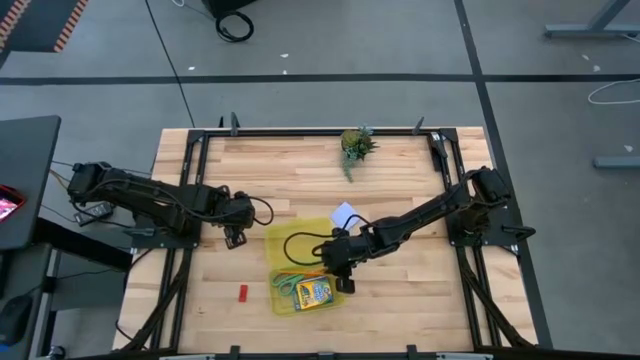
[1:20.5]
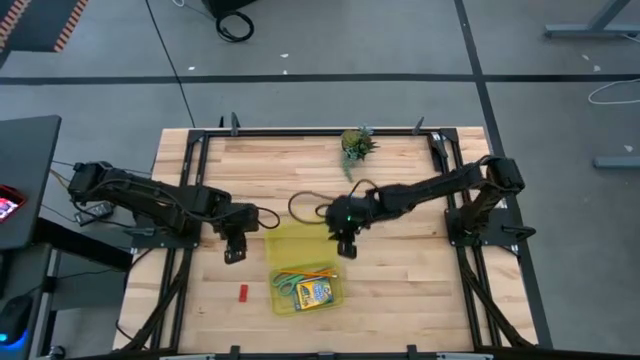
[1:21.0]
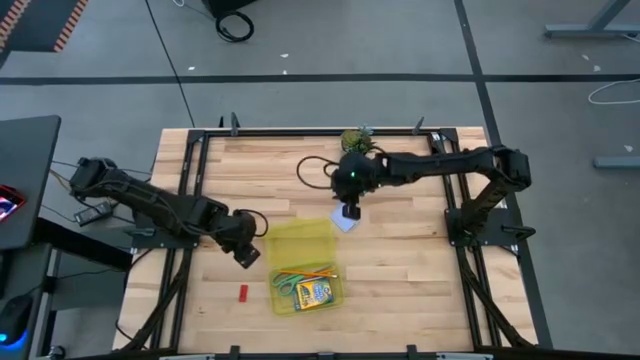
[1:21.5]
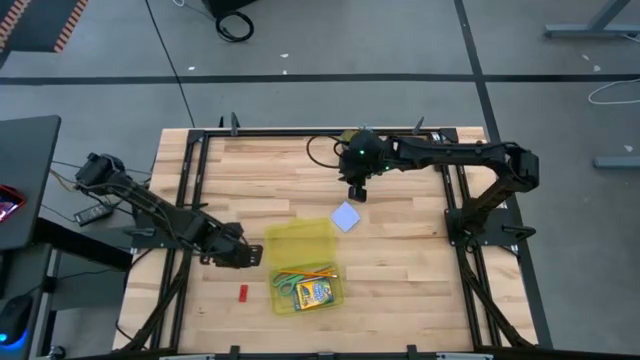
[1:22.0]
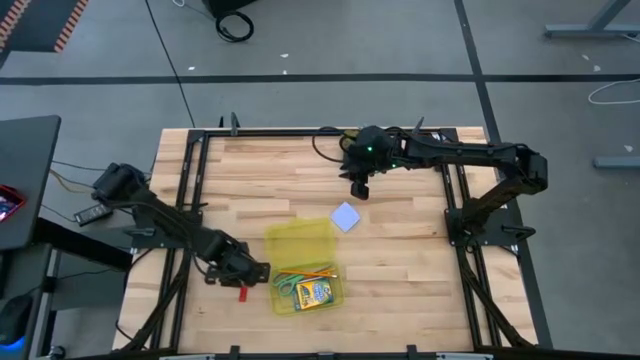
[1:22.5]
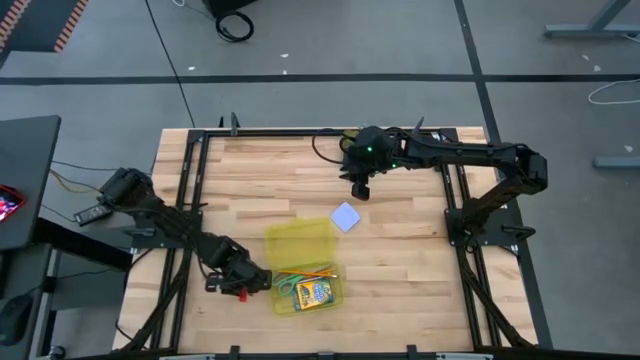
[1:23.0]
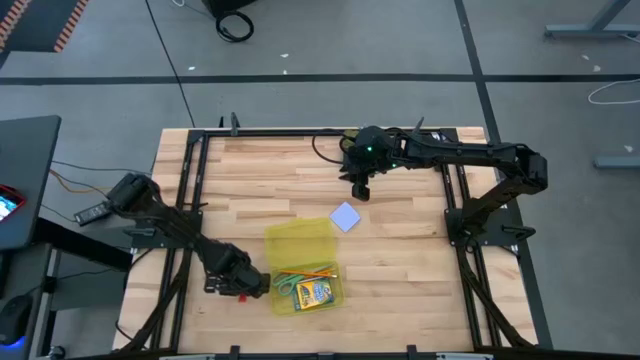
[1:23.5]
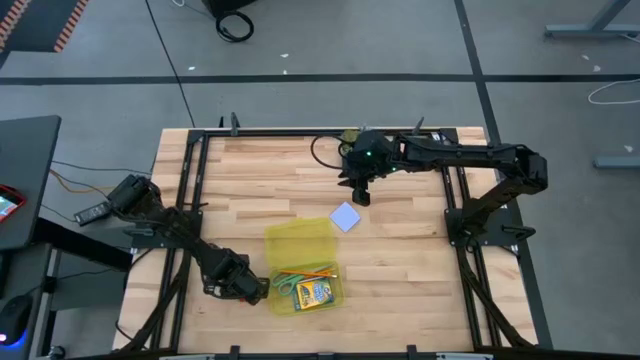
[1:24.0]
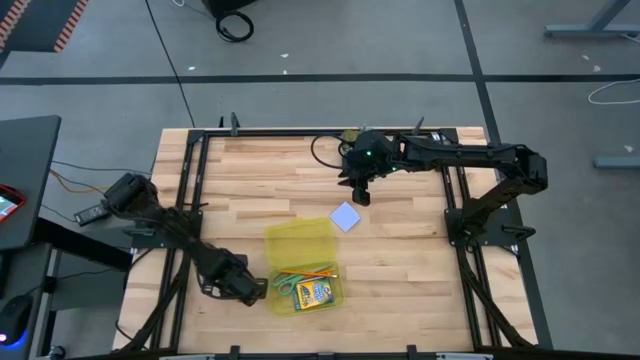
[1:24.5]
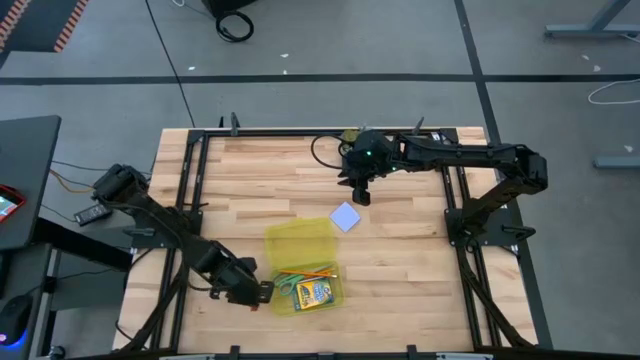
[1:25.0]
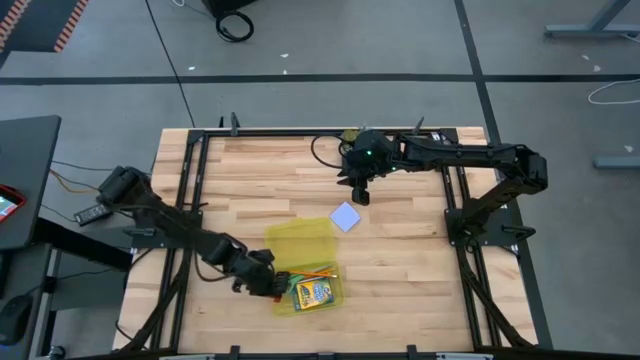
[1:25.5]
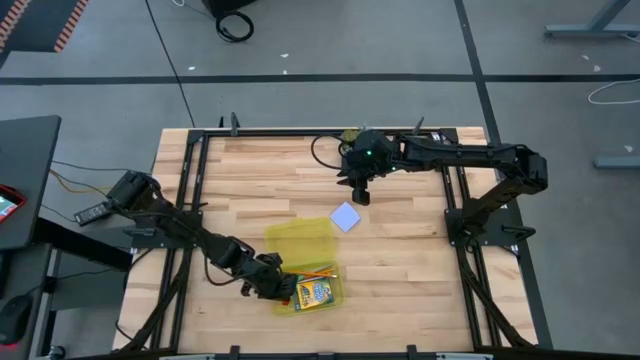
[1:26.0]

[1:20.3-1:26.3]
Task: Pack school essentials
Put the red eraser into the yellow supply box

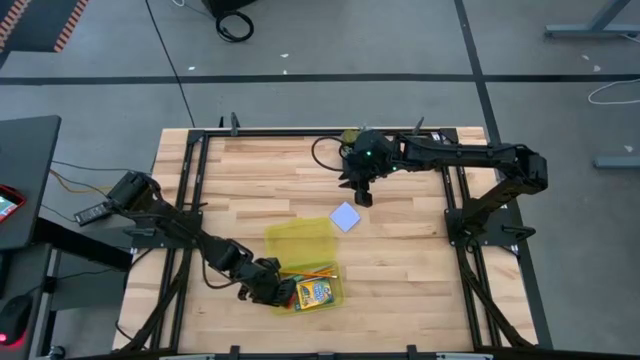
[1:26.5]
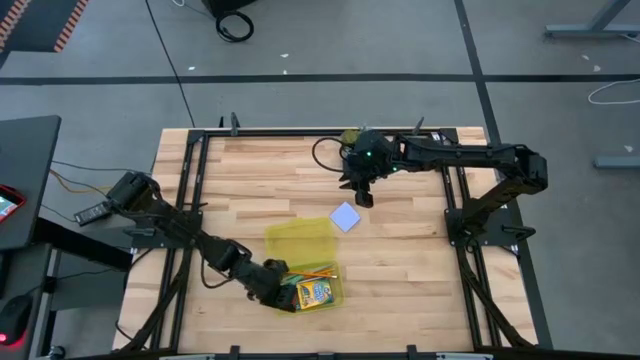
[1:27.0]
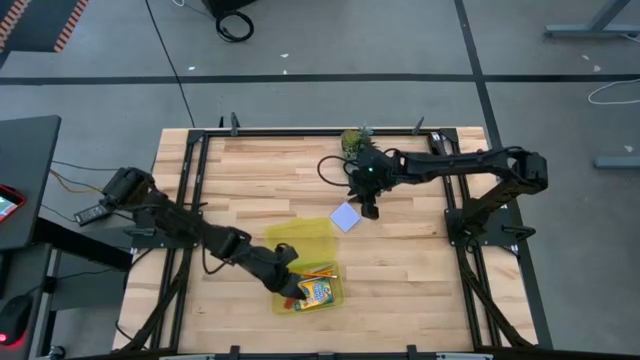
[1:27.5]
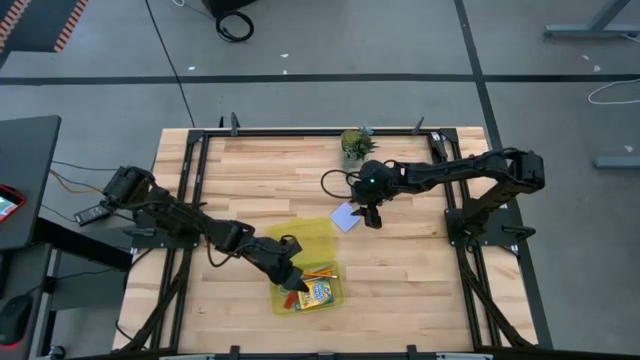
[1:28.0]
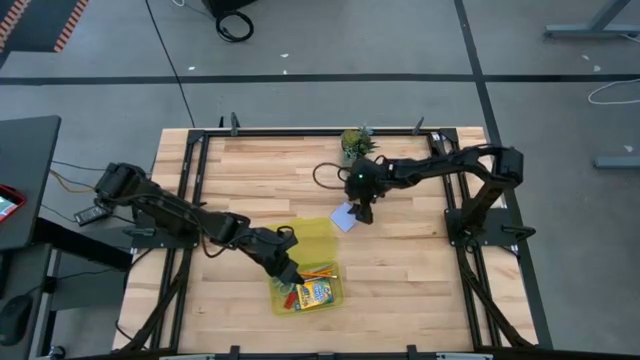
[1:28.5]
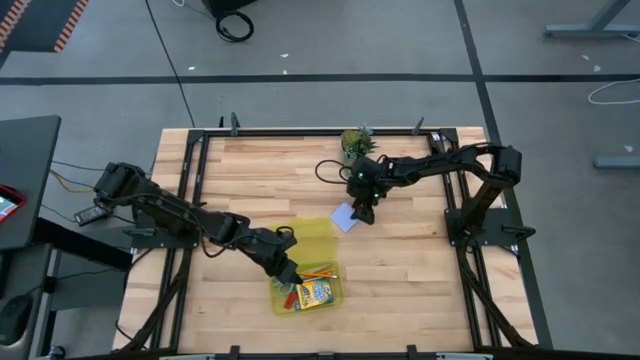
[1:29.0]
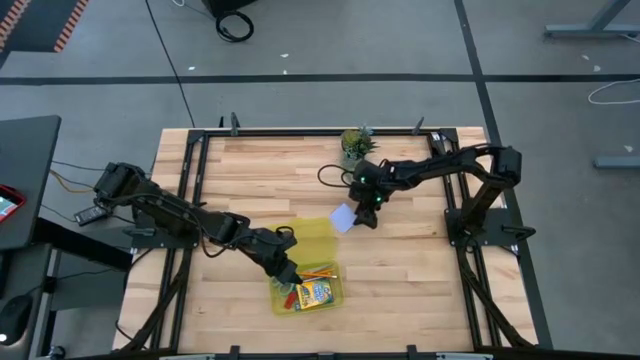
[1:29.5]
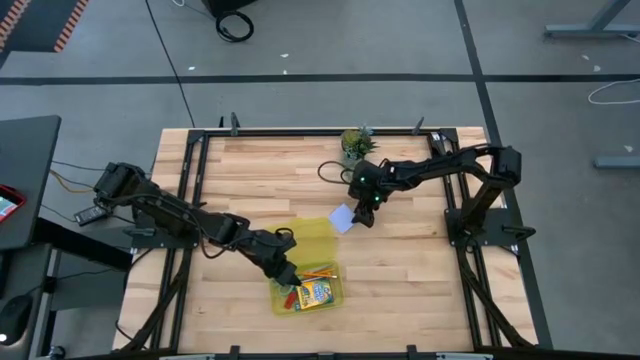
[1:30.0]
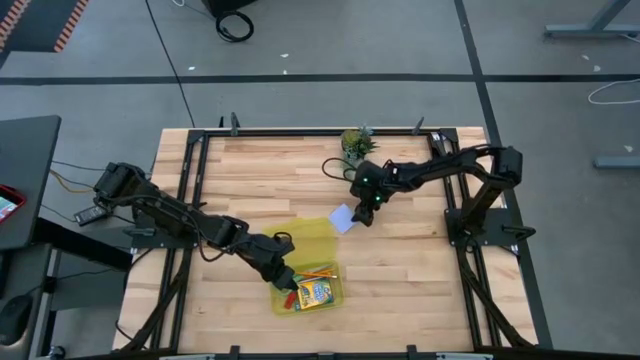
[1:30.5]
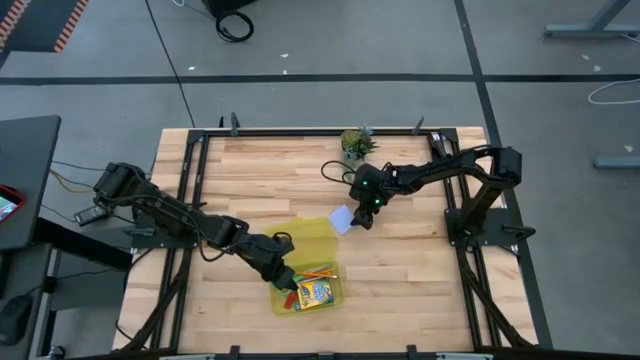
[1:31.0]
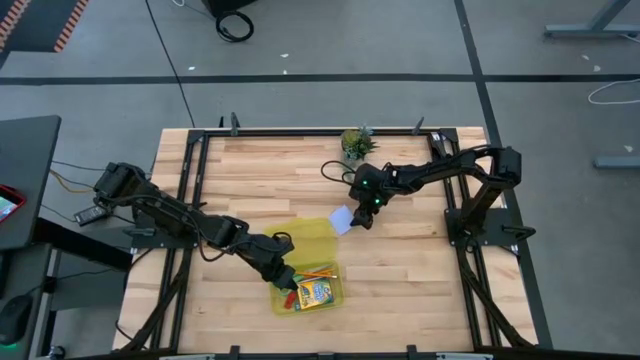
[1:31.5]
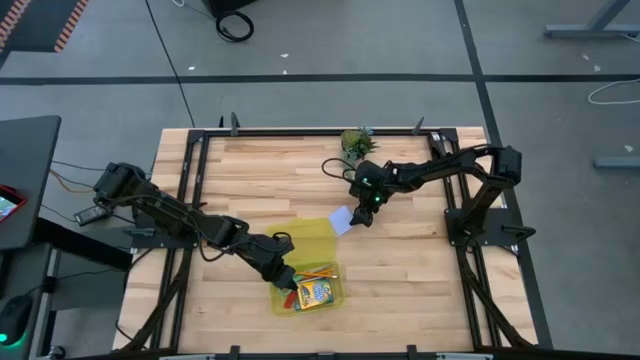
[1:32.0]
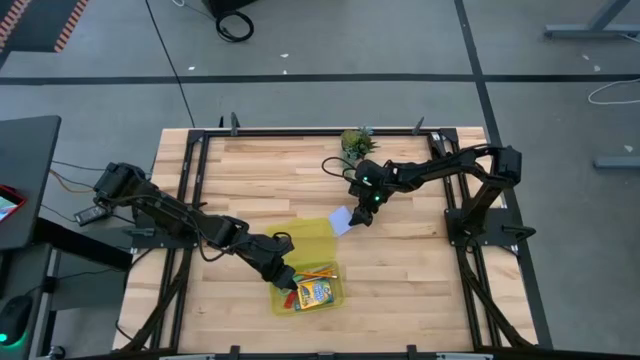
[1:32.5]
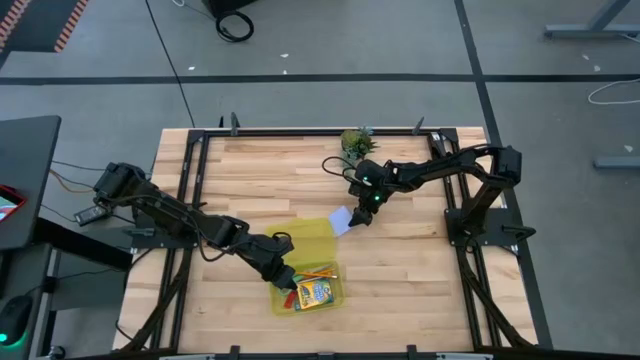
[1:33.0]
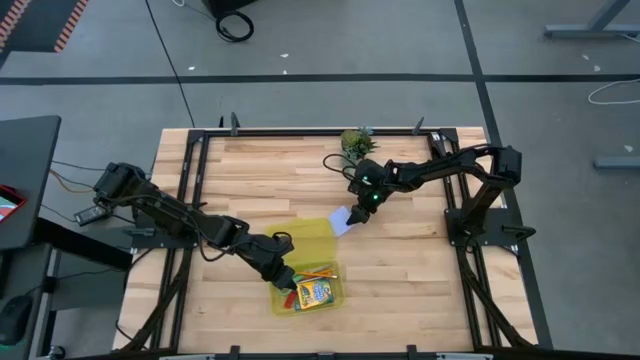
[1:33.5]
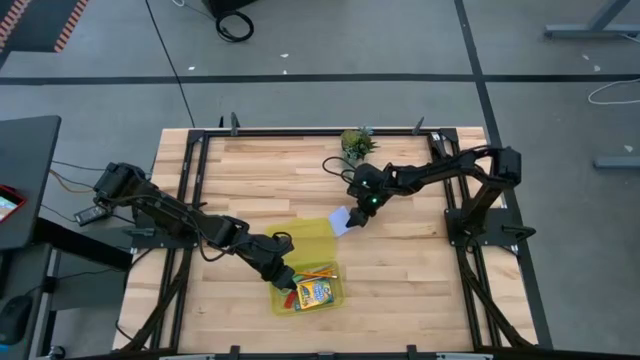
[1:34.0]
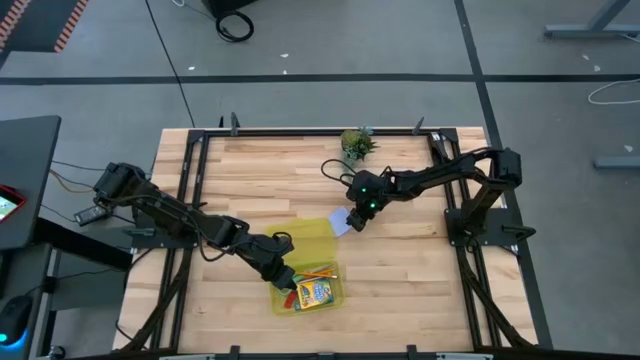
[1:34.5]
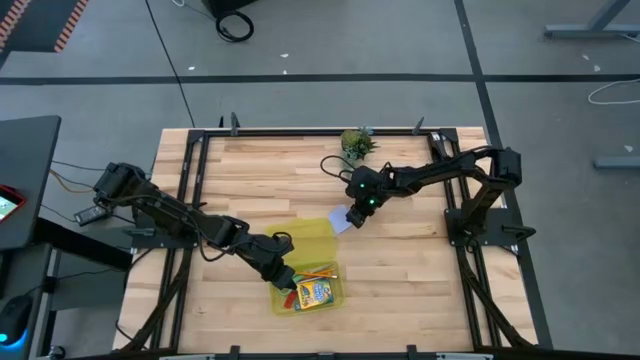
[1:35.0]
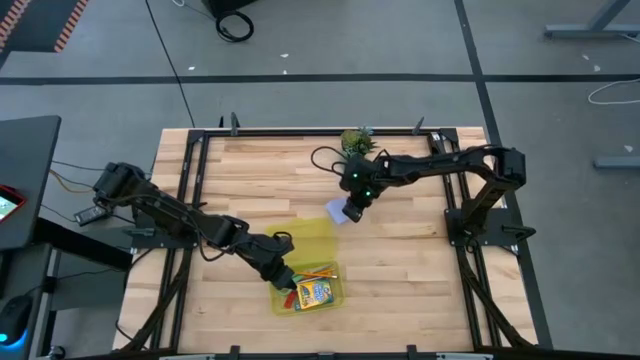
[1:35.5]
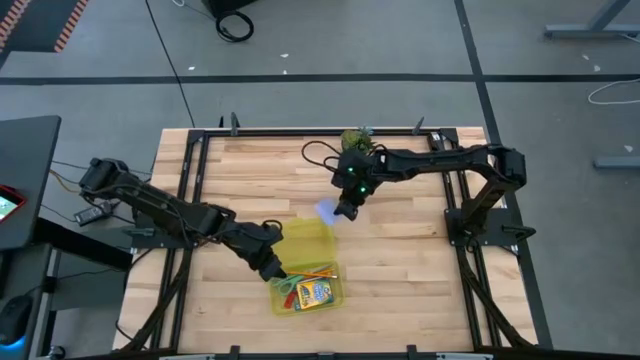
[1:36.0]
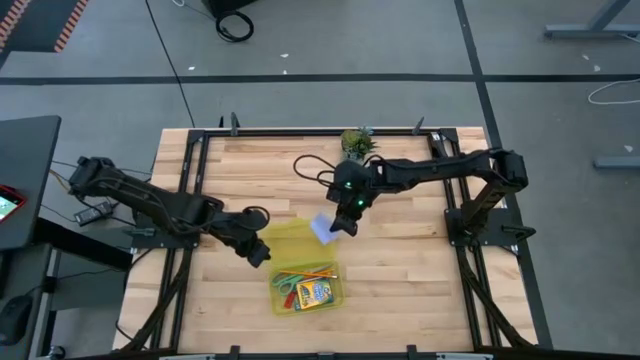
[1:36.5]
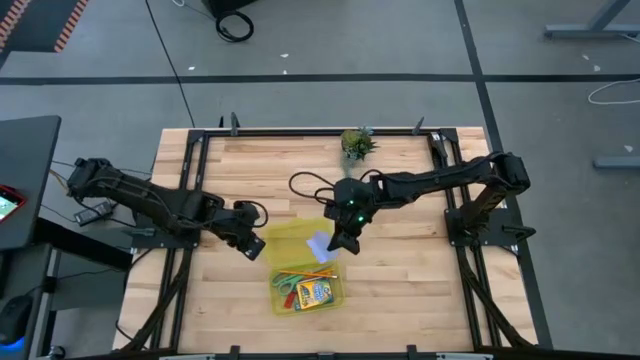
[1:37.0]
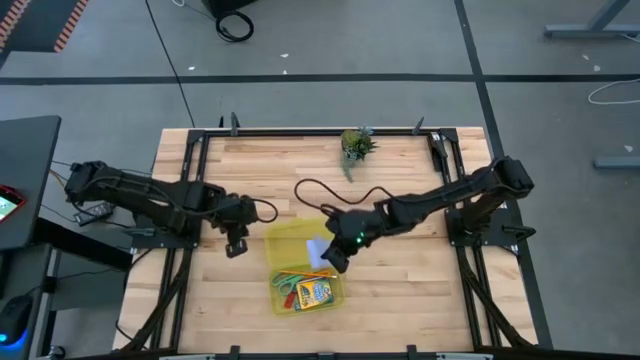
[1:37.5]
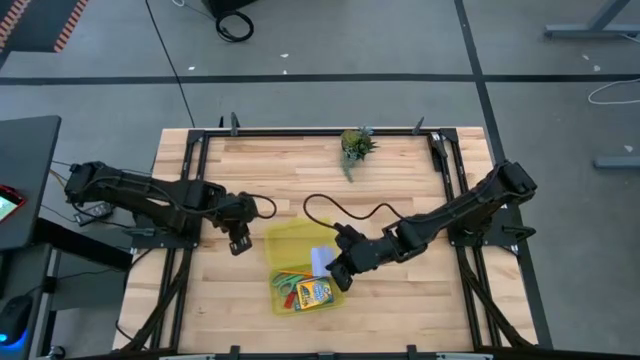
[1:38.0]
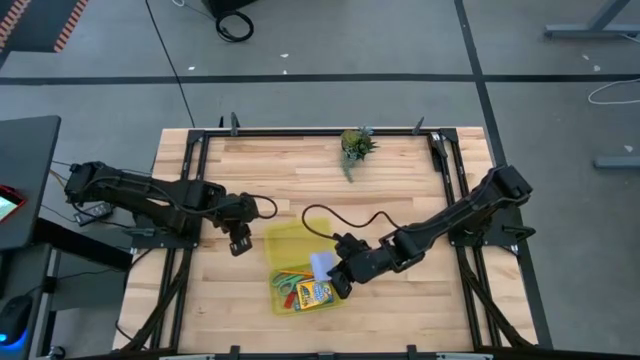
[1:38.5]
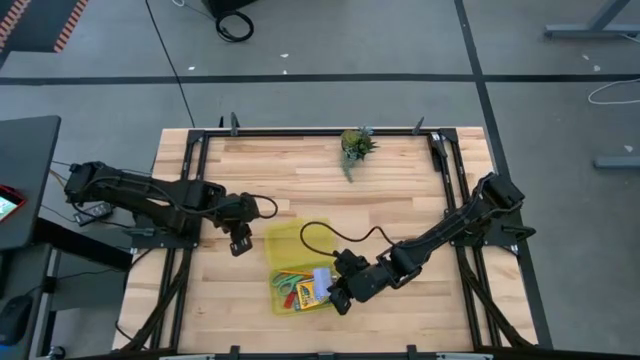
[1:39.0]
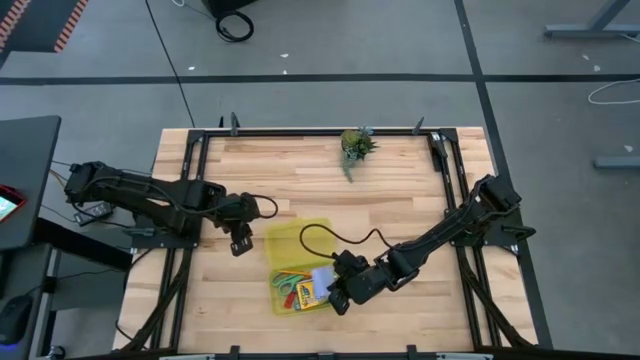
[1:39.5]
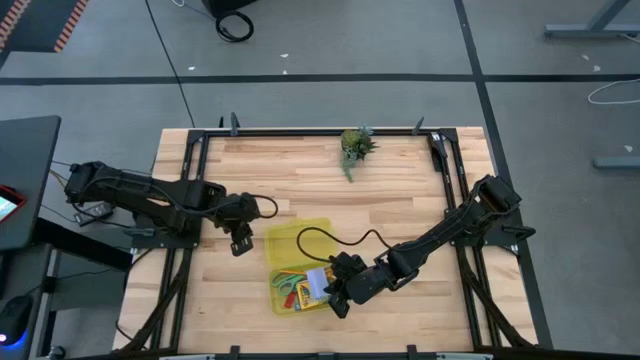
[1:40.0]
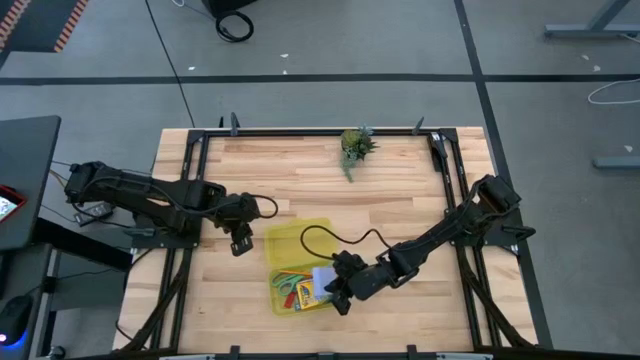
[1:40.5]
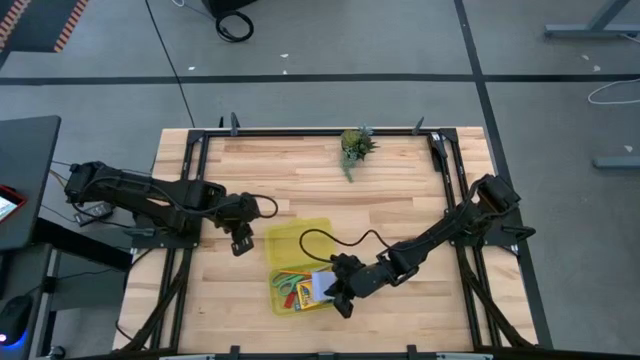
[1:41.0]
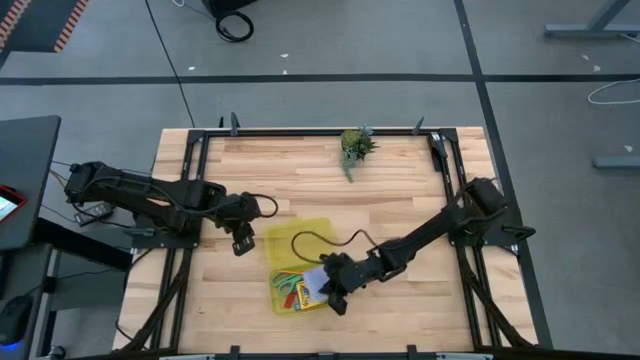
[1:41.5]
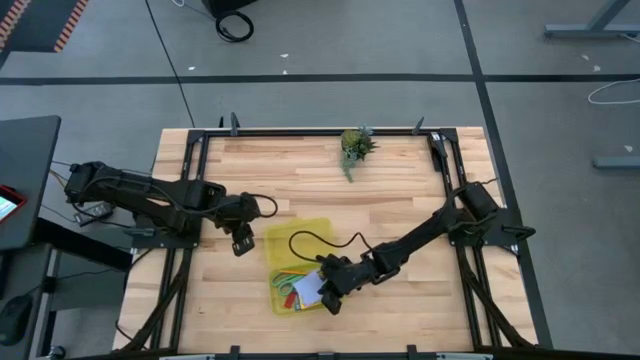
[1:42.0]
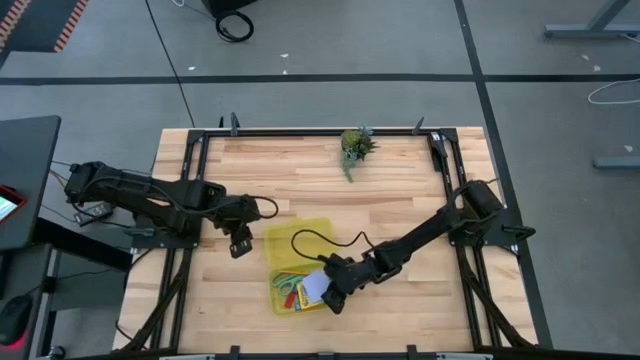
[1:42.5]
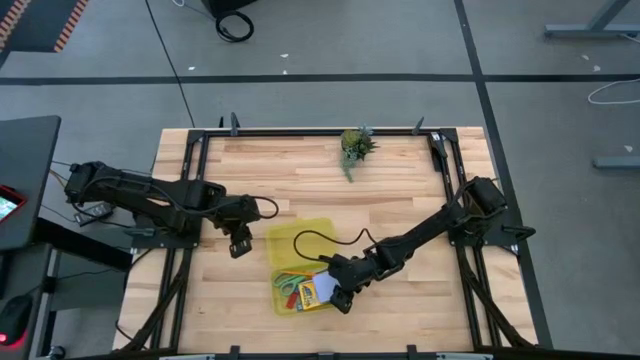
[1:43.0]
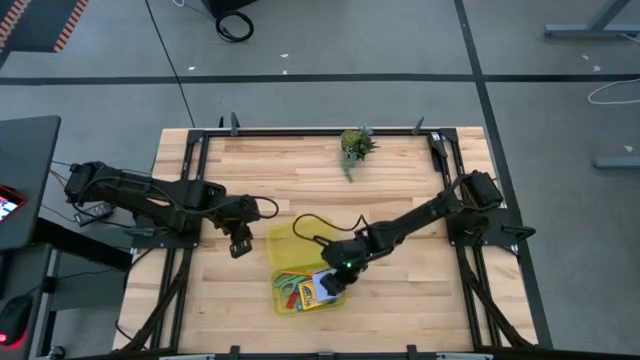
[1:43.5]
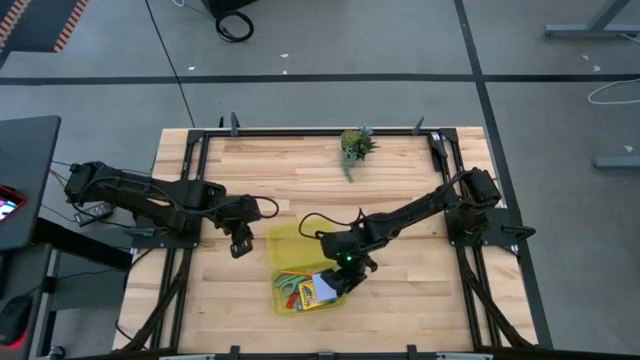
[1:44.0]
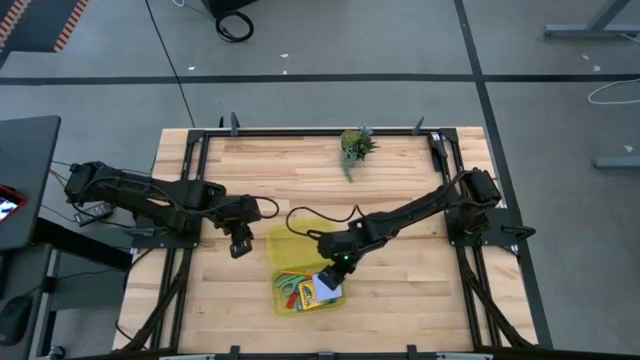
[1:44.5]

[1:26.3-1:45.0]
Put the violet sticky notes into the yellow supply box
